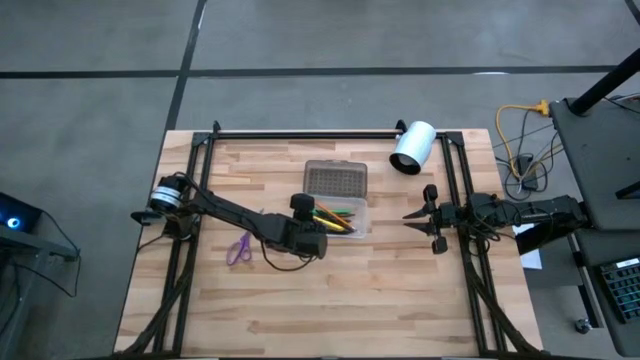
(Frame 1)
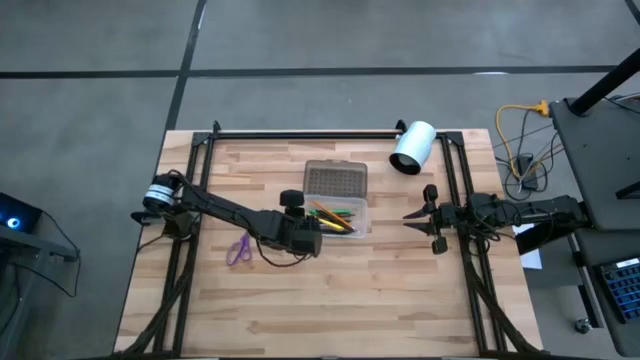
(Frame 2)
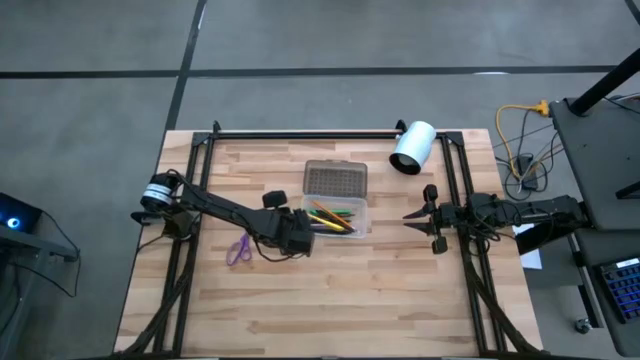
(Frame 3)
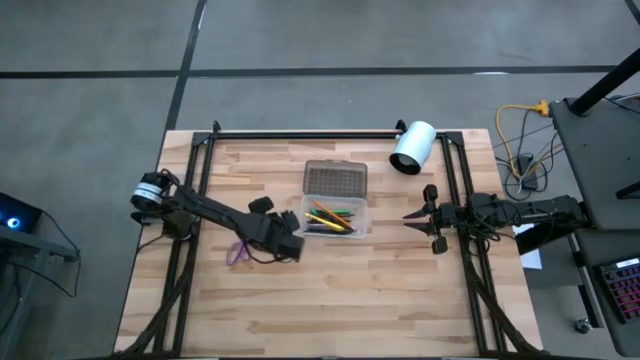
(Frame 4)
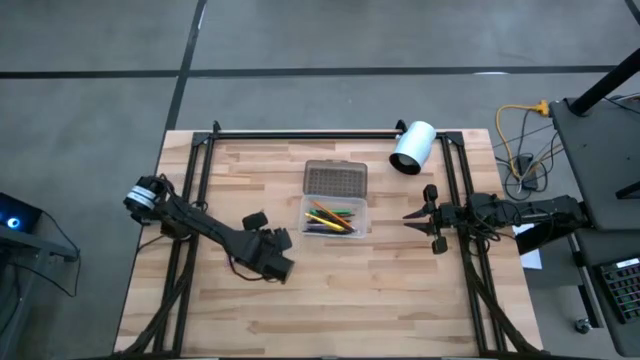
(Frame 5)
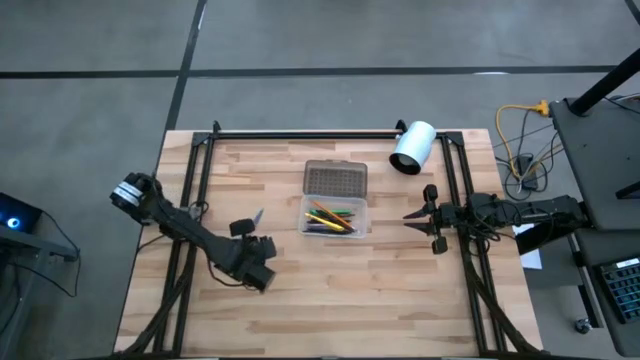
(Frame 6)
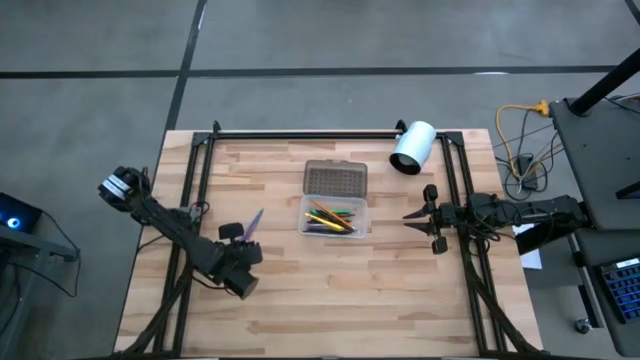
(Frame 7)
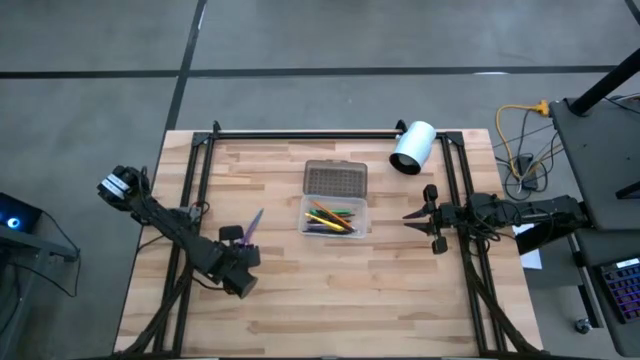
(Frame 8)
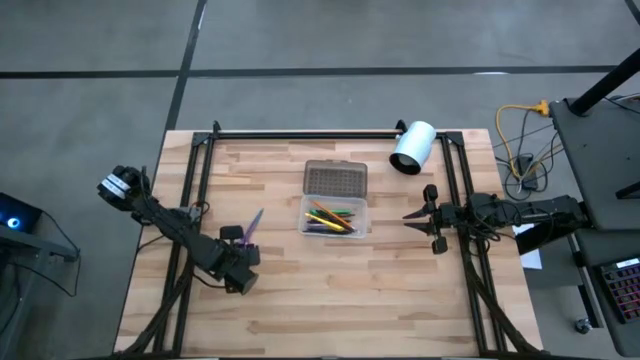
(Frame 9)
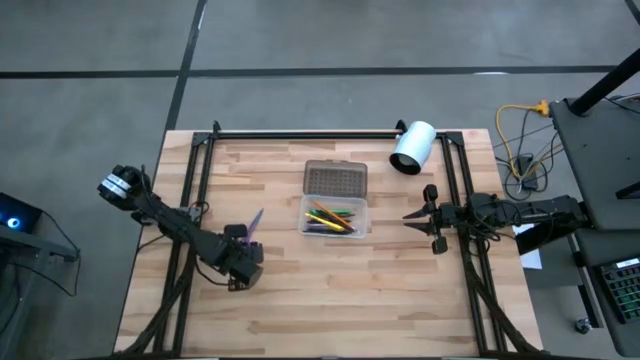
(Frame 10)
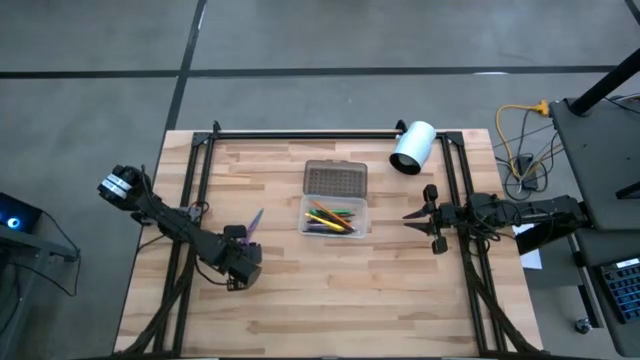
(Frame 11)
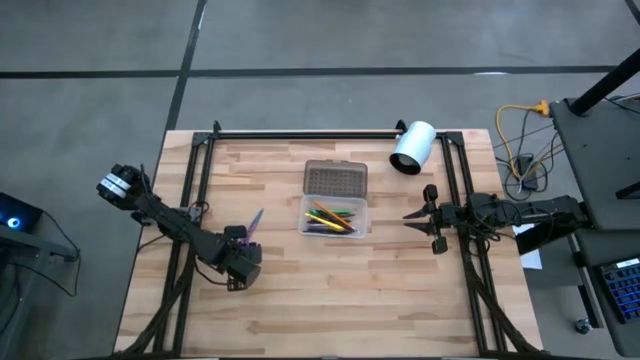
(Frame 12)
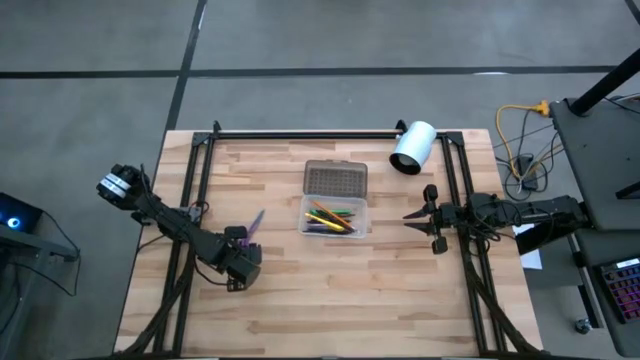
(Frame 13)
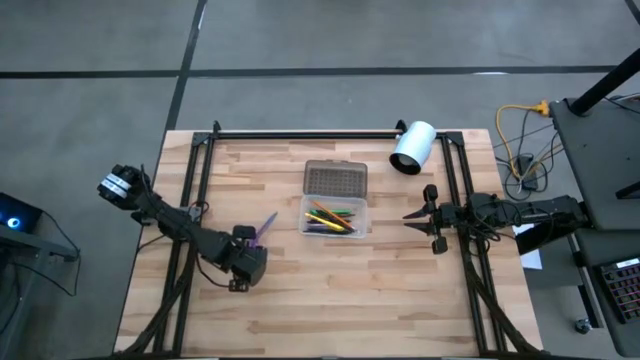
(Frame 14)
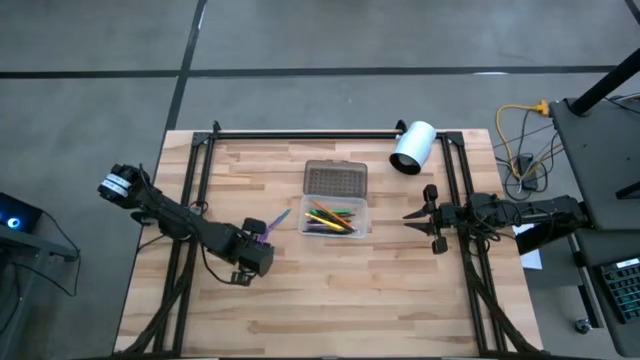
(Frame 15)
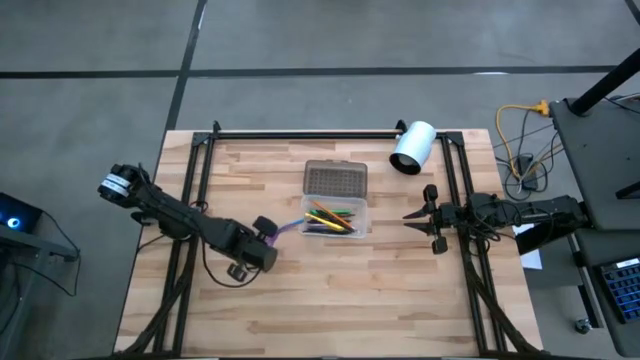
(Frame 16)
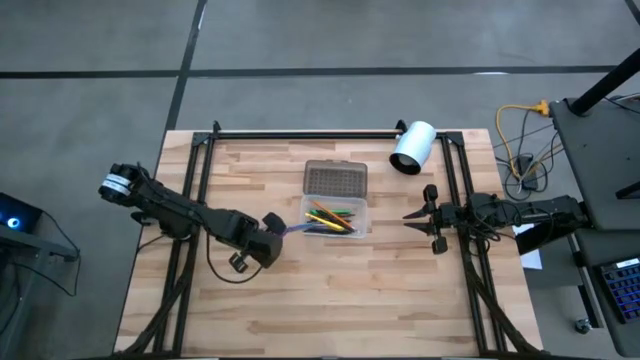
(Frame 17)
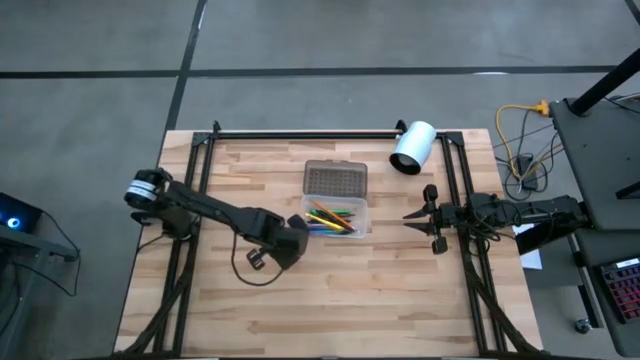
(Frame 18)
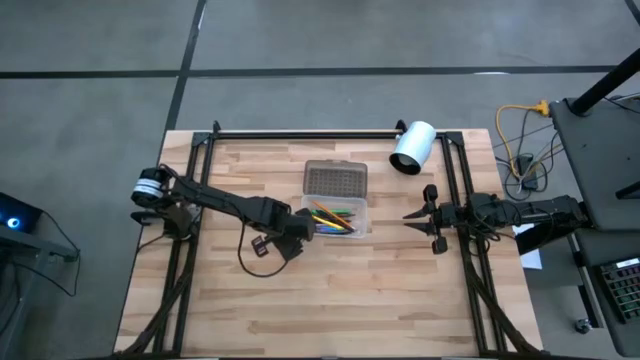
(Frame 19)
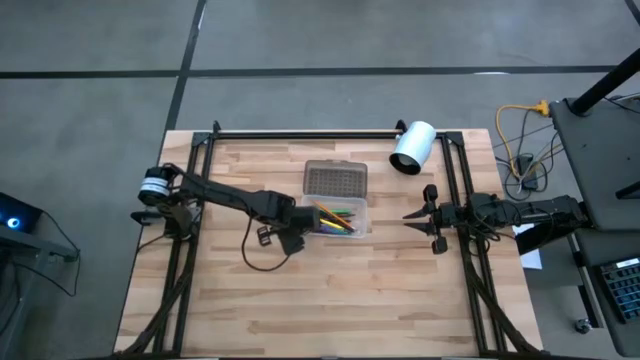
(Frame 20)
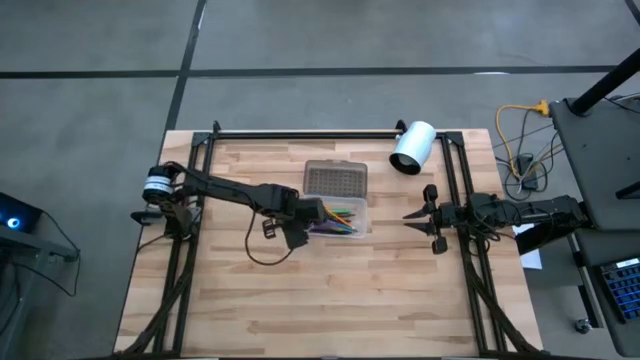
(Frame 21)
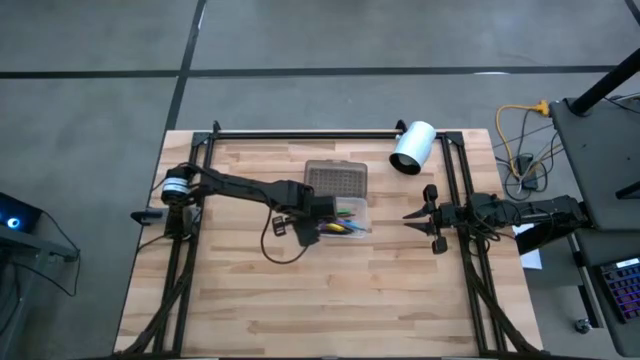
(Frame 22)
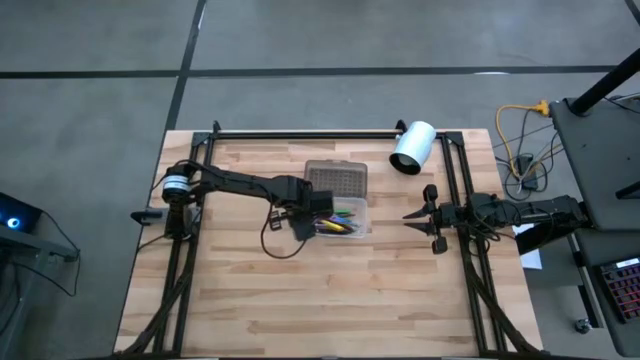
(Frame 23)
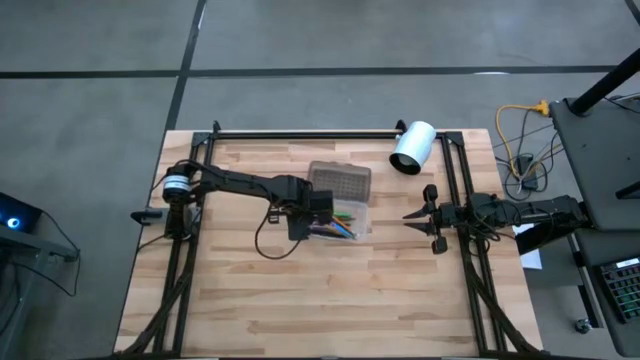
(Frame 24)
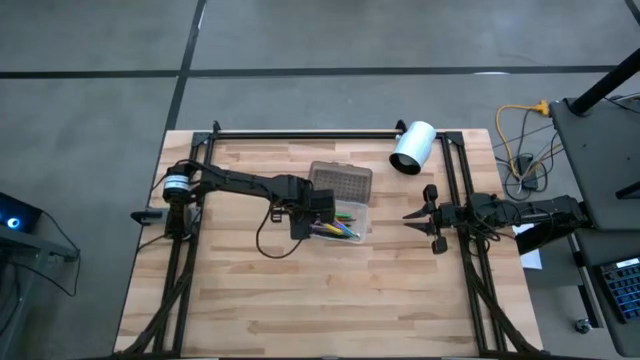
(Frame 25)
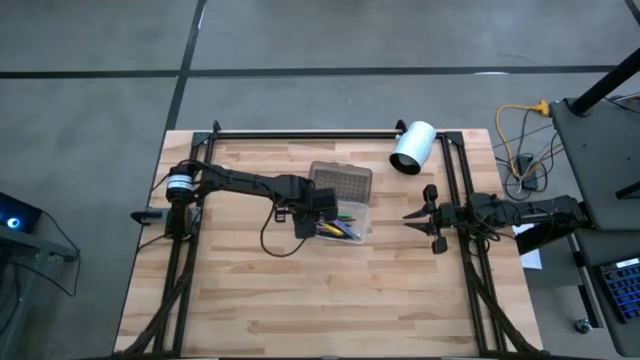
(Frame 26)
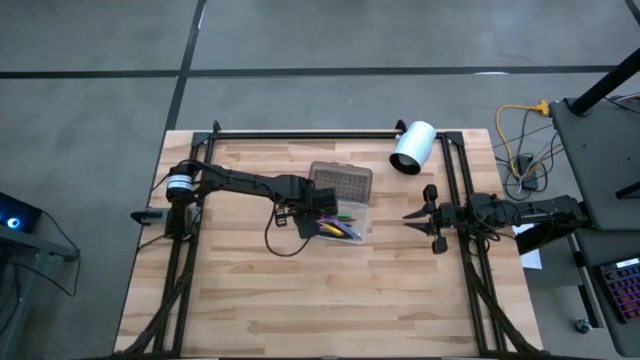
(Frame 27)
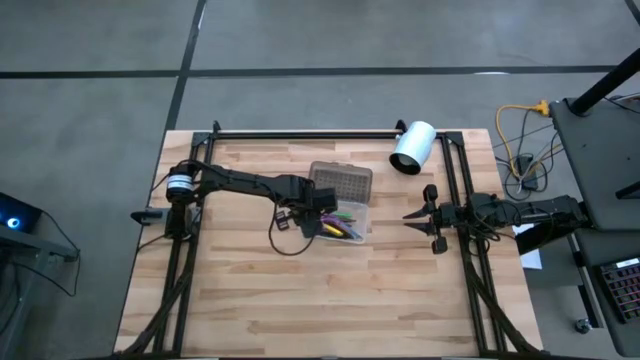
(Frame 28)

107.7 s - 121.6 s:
Task: Pick & place school supplies into a supply box
Put the purple scissors into the white and black supply box

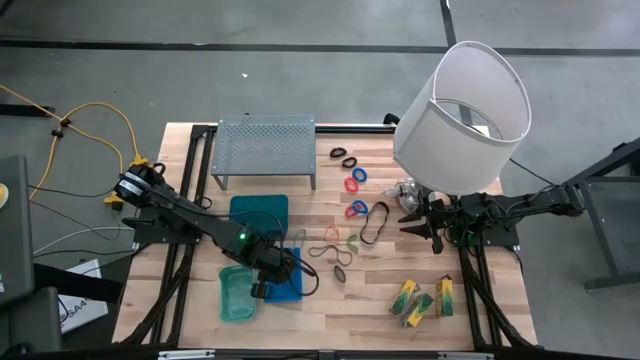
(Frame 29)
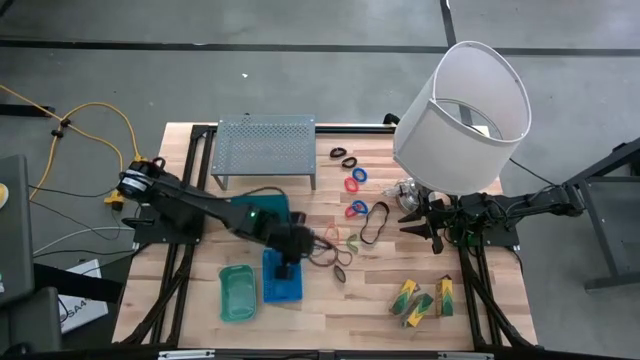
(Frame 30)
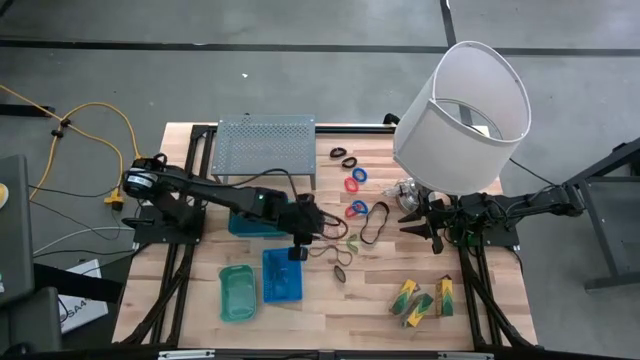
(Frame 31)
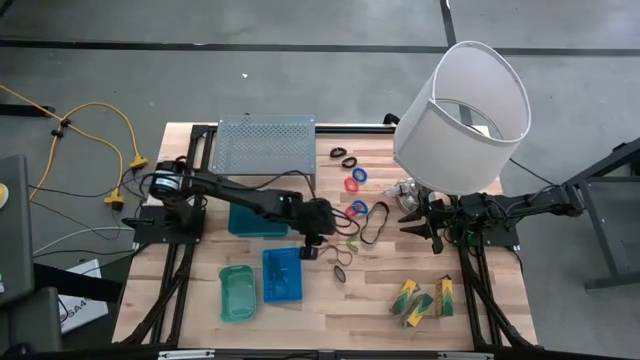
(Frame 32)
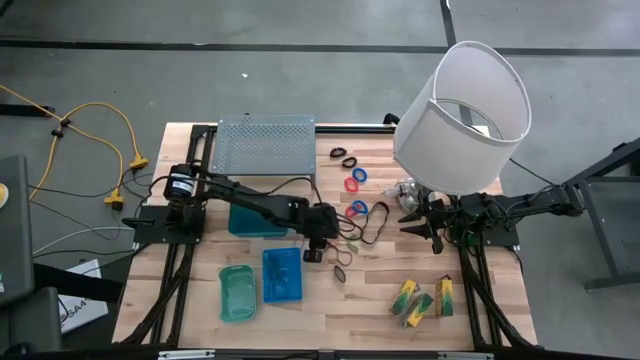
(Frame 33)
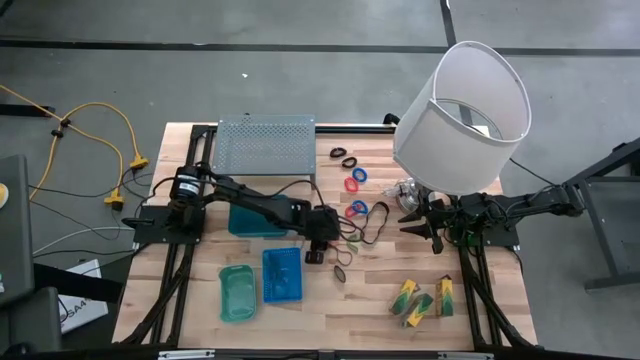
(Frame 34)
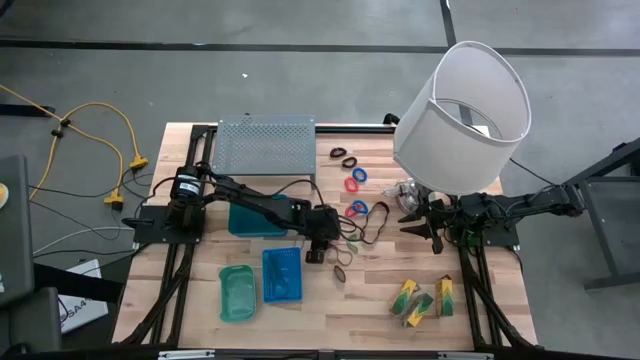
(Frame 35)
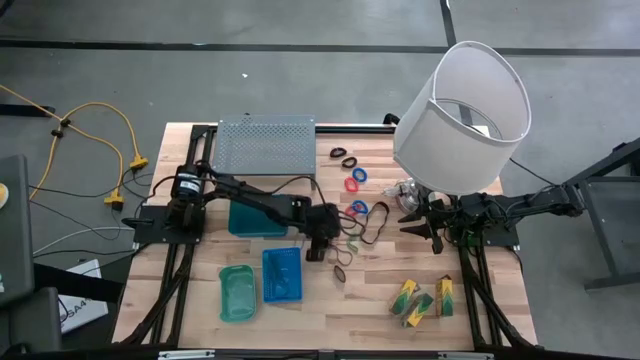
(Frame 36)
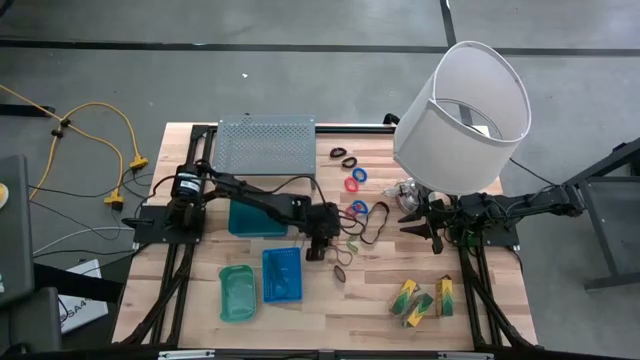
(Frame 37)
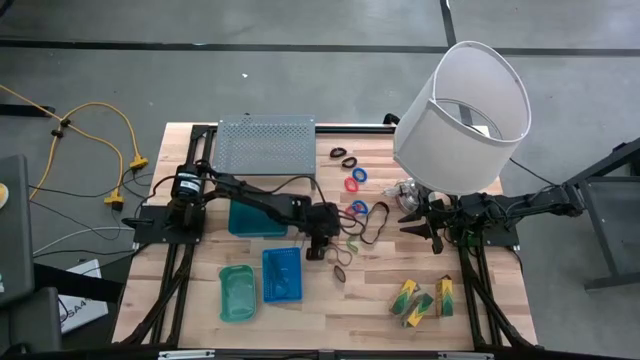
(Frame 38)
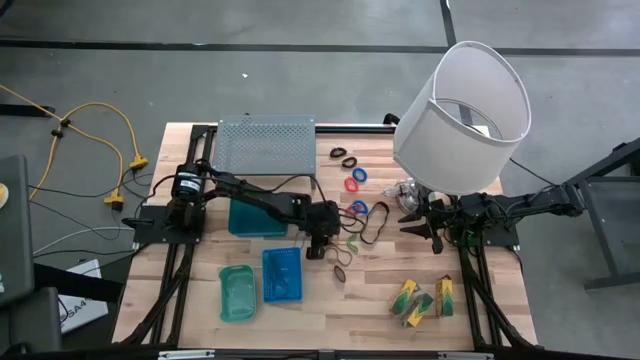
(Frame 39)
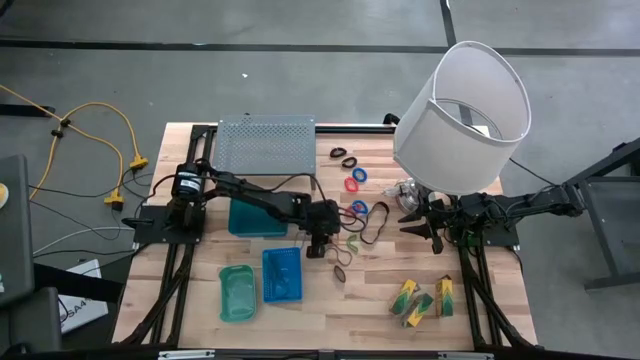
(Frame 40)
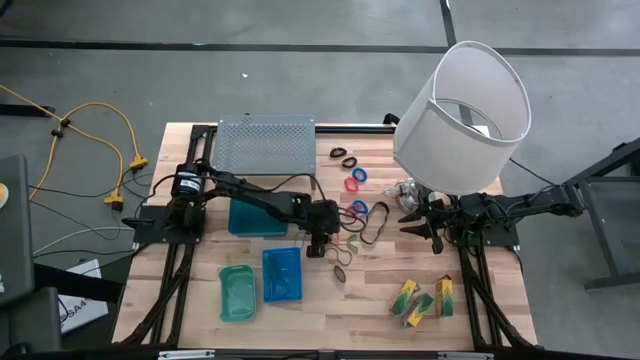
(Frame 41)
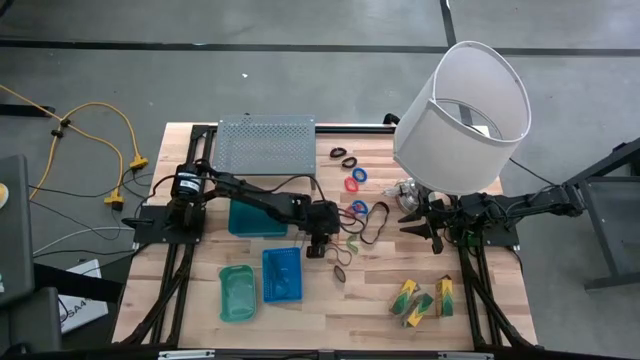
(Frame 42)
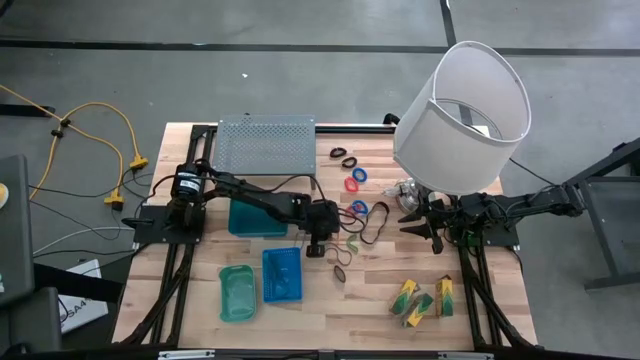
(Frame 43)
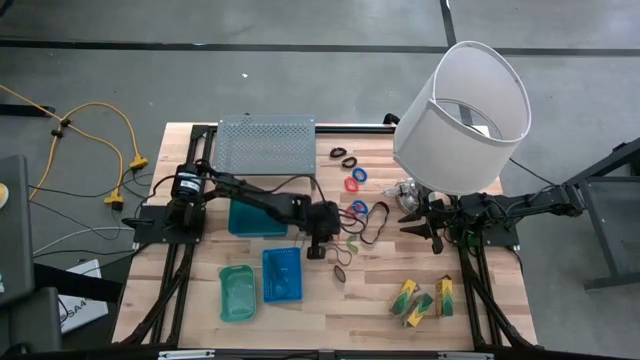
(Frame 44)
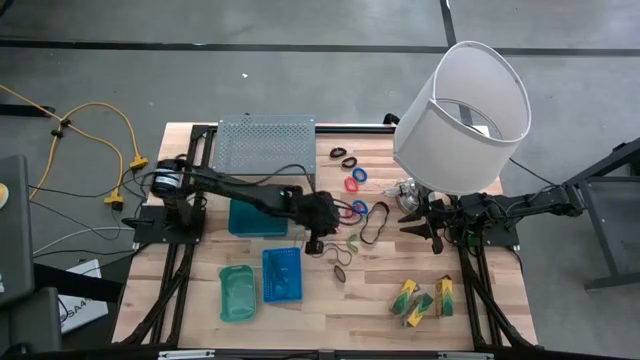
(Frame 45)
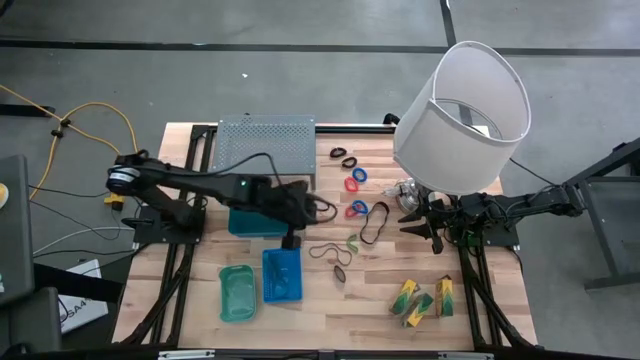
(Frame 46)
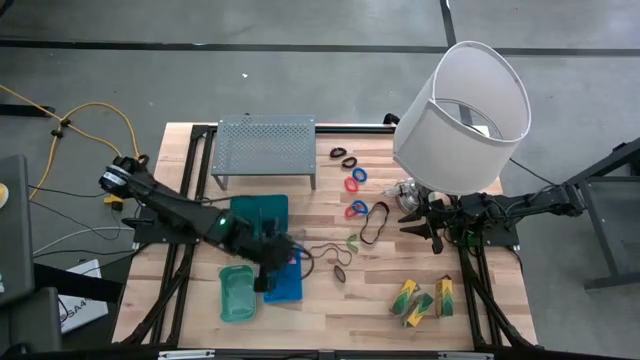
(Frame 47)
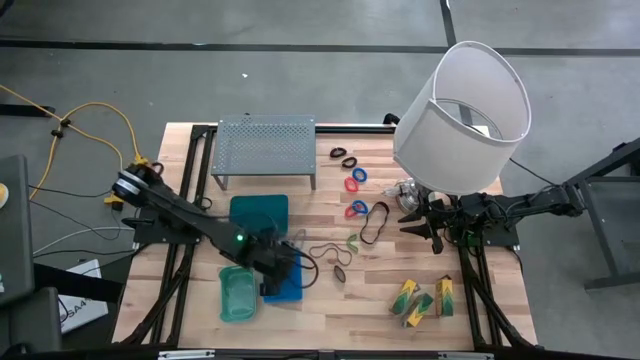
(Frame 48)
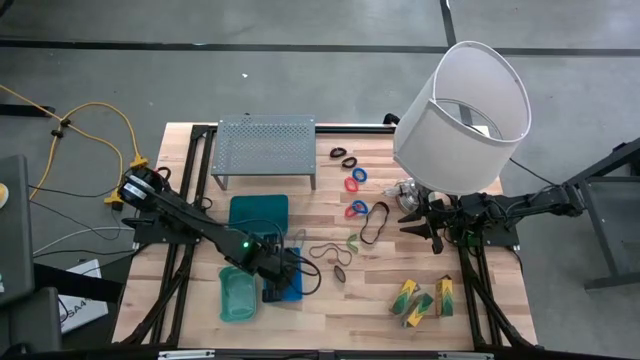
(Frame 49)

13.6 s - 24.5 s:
Task: Pick & Place Office Desk Supplies
Put the orange rubber band into the bottom blue bin
